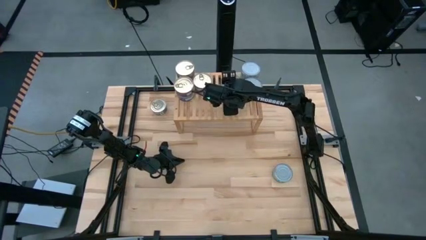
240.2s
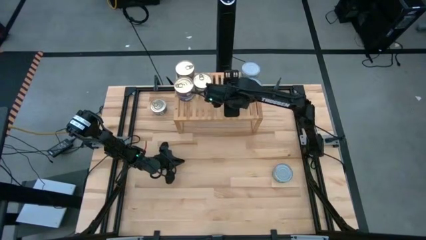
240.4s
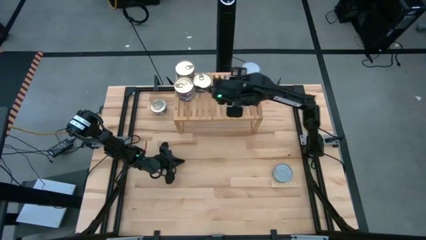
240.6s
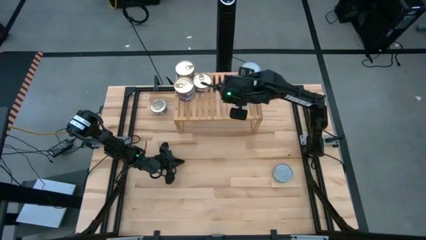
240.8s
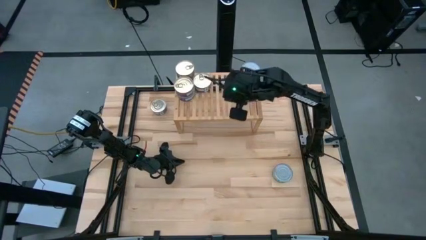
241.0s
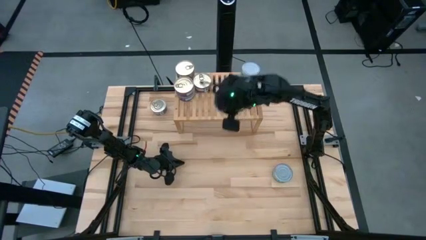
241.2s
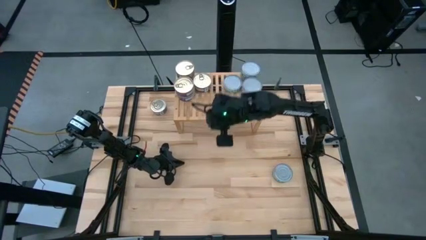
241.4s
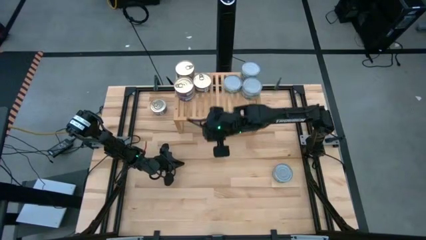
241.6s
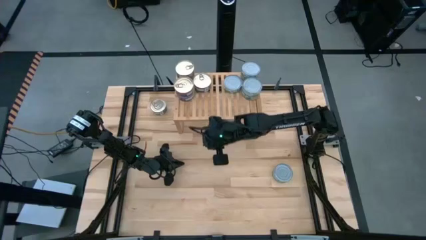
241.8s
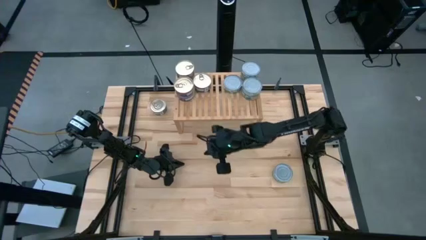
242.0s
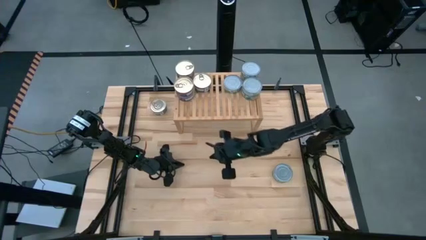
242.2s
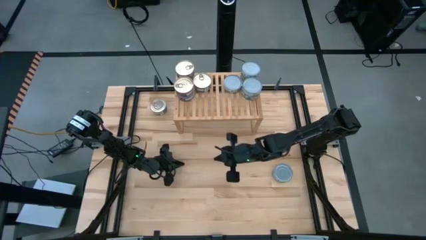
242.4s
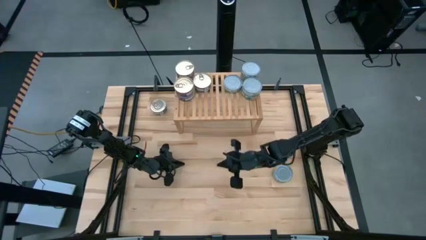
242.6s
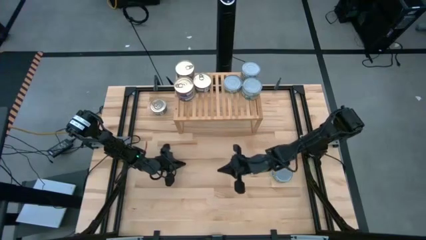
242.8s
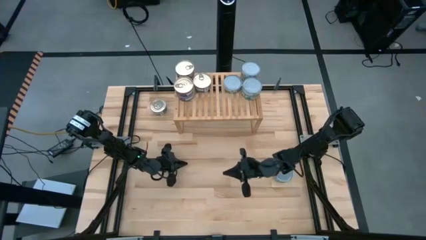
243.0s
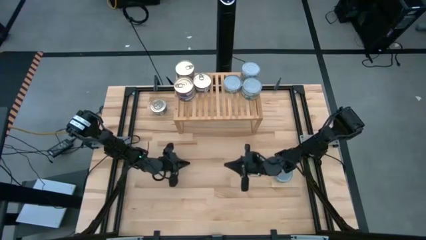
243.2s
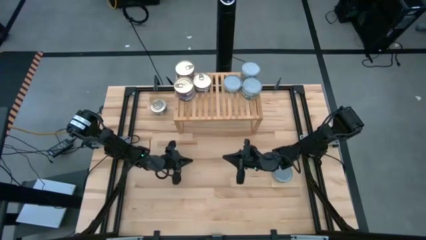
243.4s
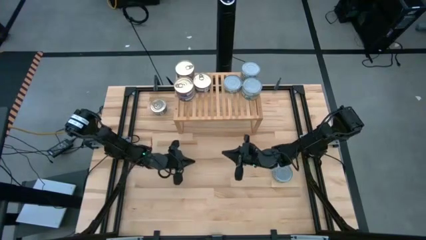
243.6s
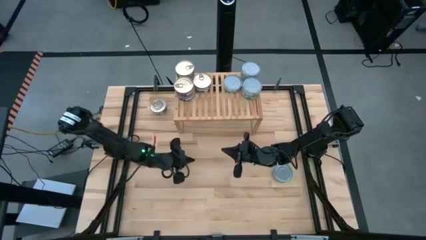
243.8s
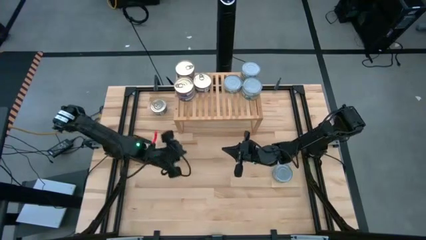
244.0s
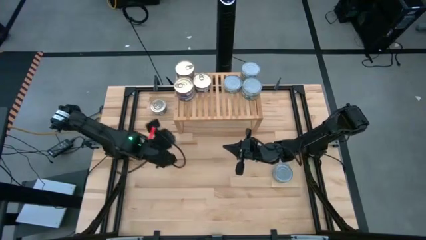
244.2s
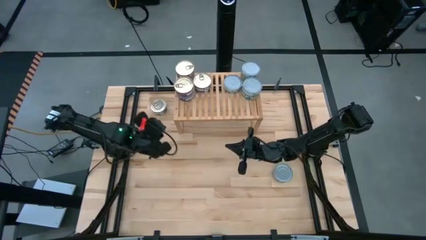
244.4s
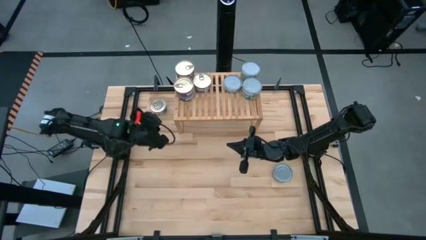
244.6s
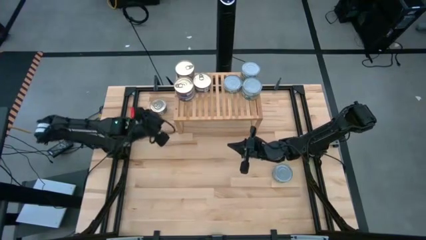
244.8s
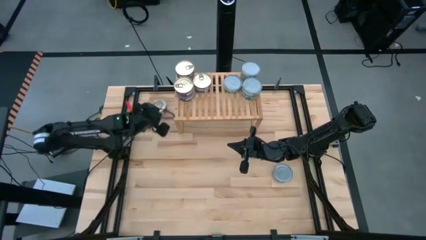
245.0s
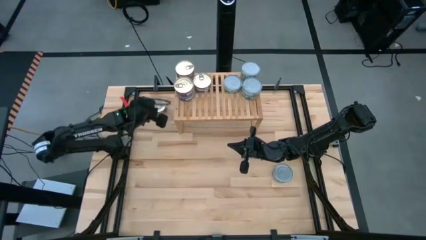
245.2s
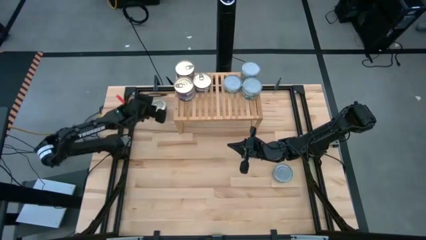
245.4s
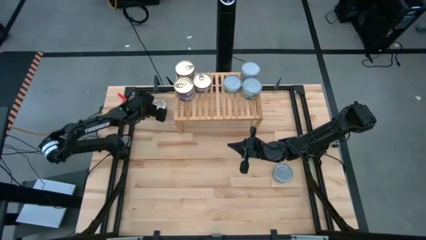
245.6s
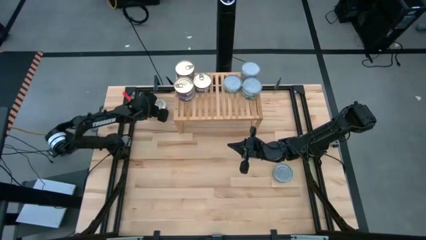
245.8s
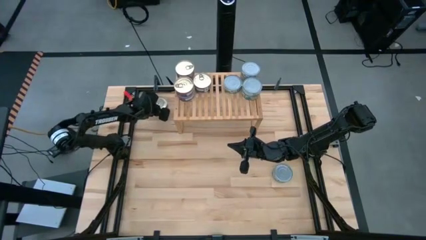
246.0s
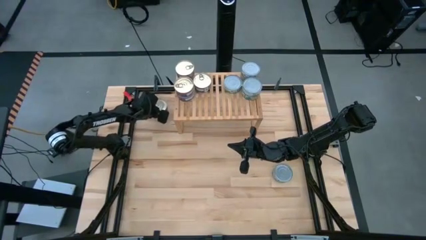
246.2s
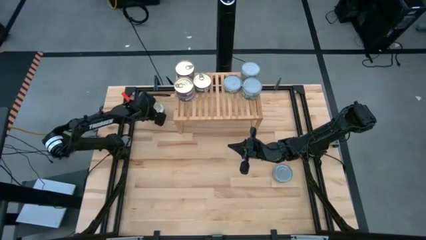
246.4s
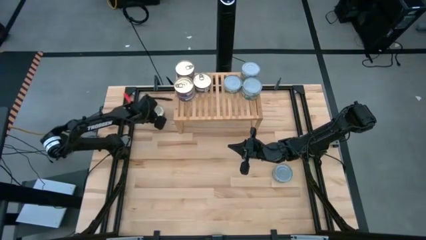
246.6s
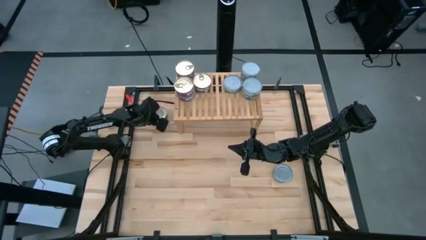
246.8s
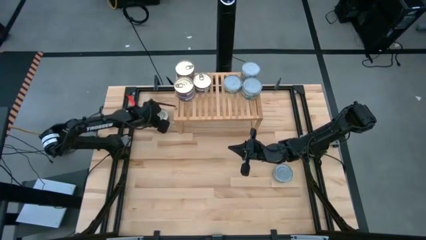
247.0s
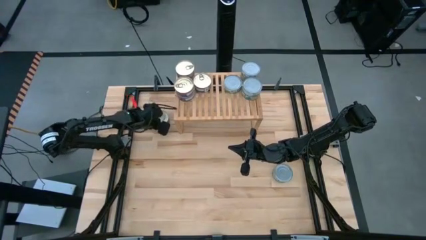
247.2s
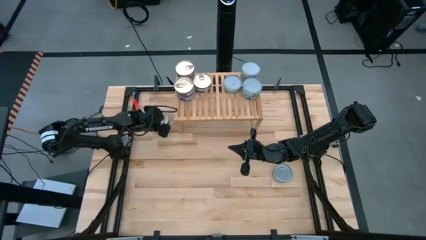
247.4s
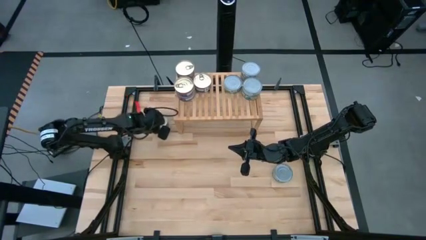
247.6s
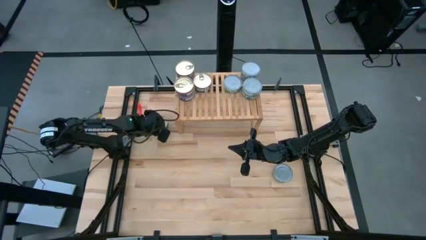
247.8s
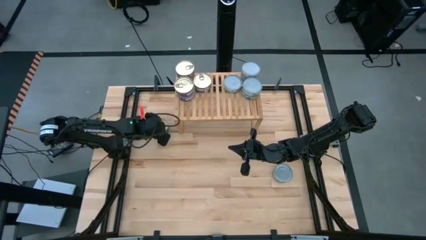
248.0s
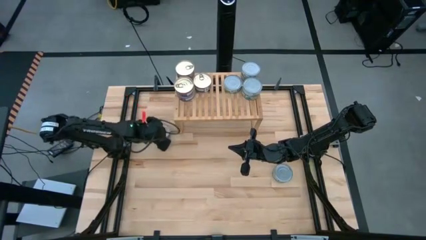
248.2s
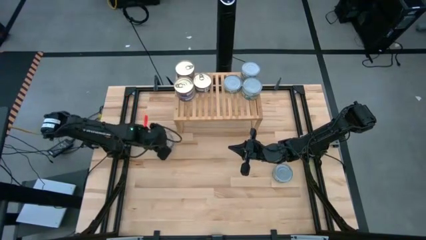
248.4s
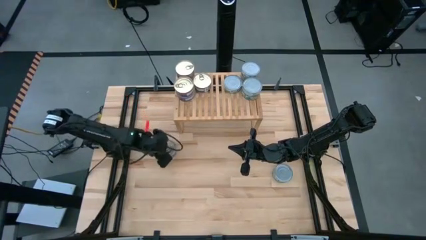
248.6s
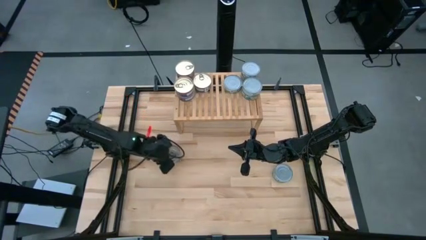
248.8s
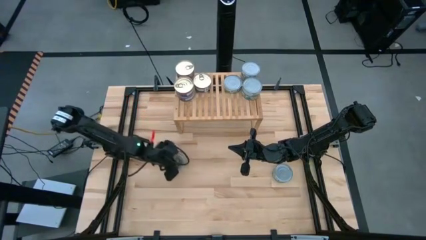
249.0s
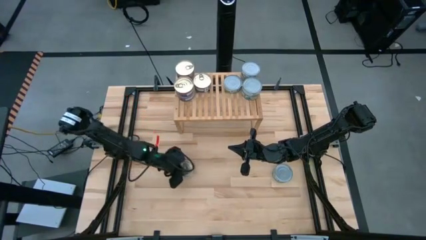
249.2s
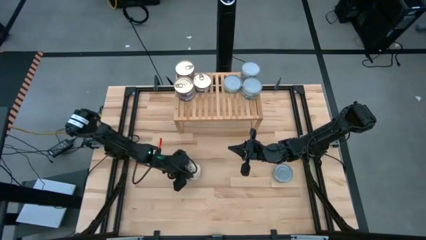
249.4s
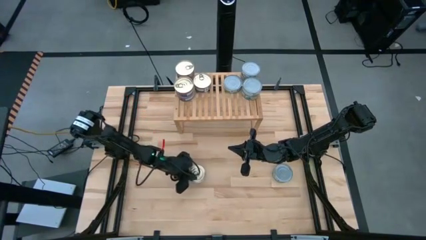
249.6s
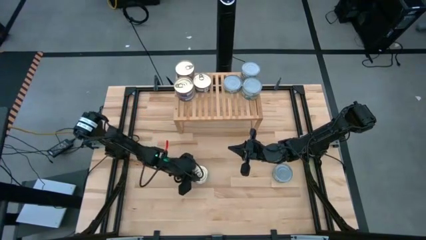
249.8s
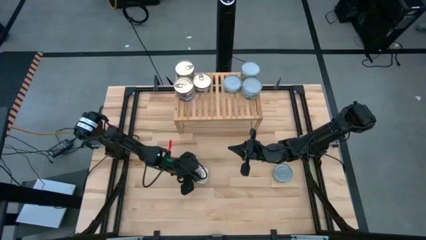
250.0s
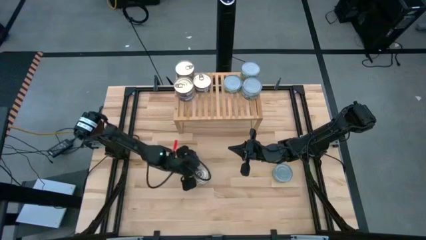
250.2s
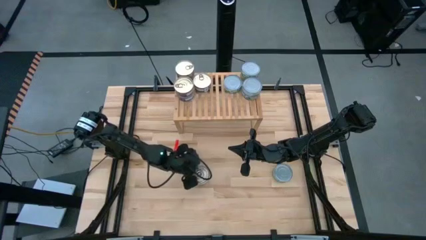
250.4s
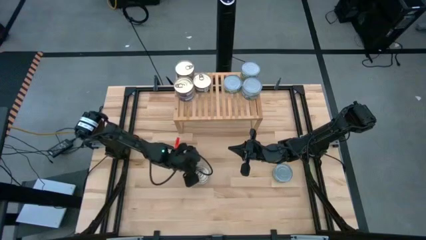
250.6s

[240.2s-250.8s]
Task: Stack canned seafood by type on shelf
Stack the blue-pink tuna can on top of the other blue tuna can on the shelf

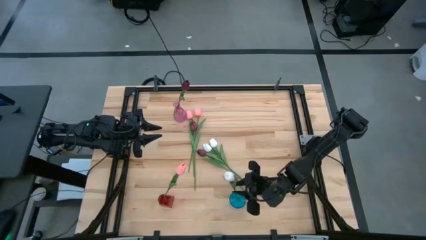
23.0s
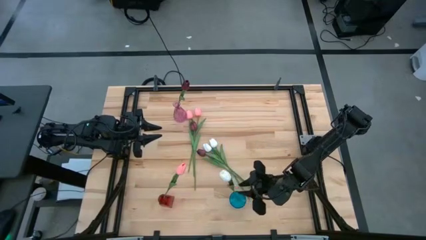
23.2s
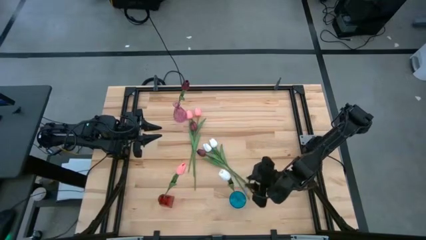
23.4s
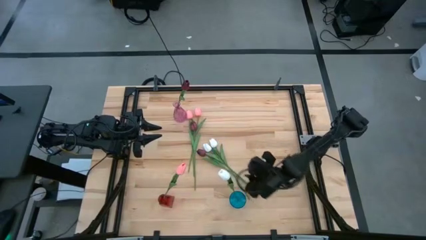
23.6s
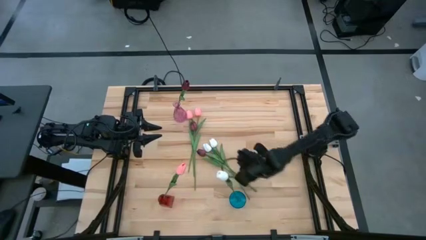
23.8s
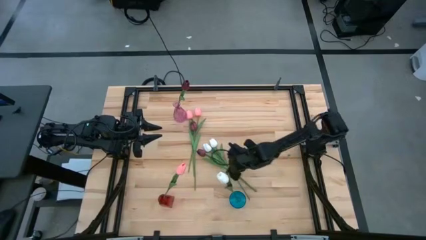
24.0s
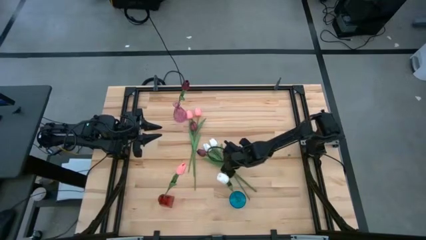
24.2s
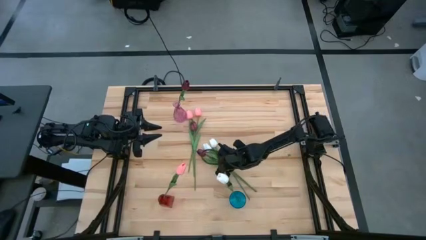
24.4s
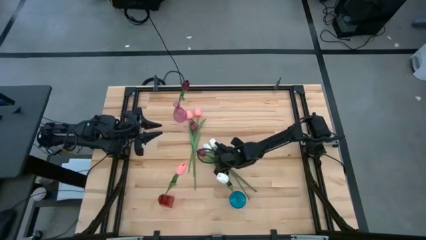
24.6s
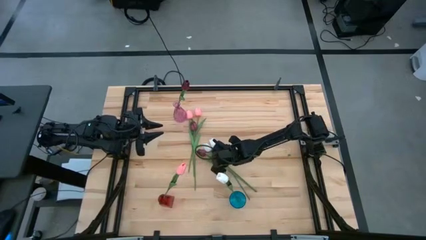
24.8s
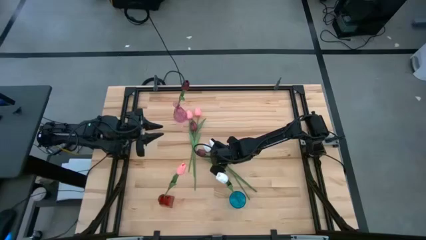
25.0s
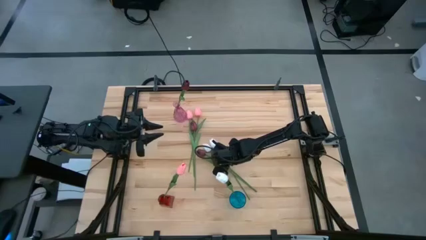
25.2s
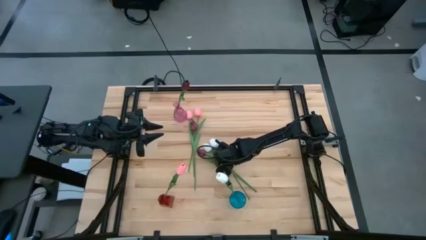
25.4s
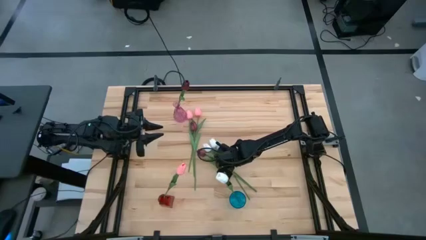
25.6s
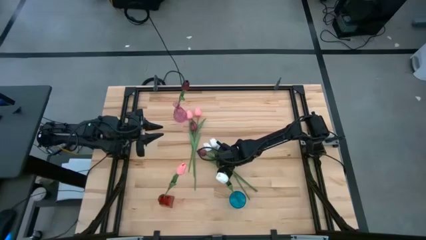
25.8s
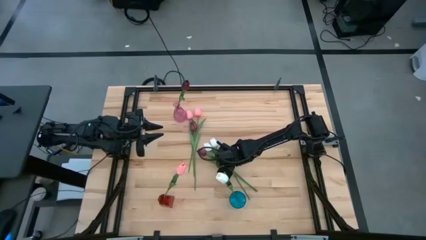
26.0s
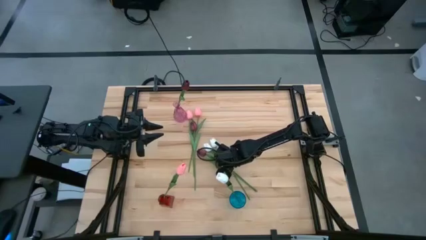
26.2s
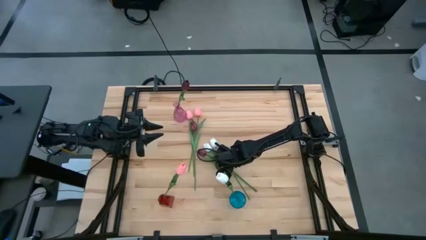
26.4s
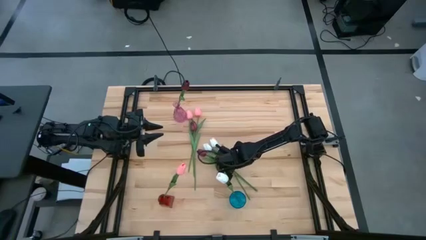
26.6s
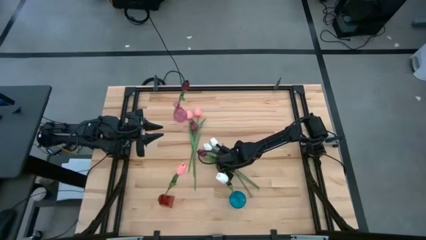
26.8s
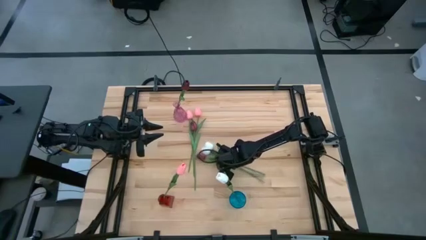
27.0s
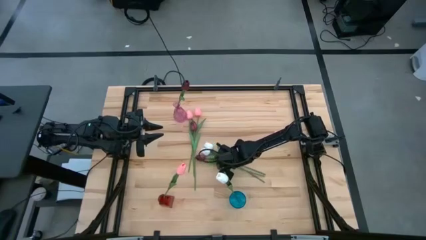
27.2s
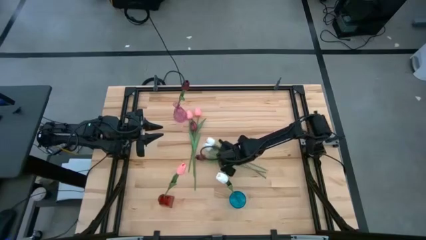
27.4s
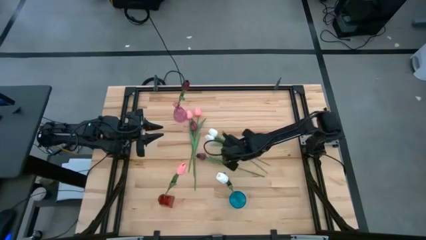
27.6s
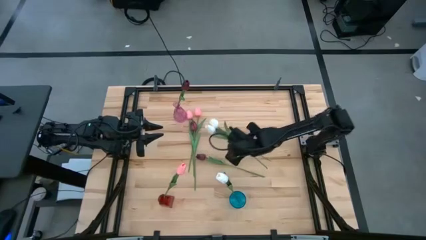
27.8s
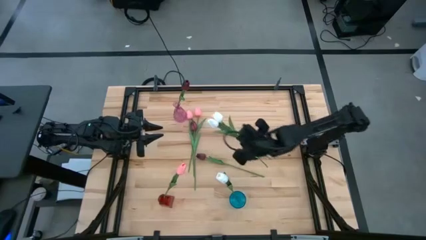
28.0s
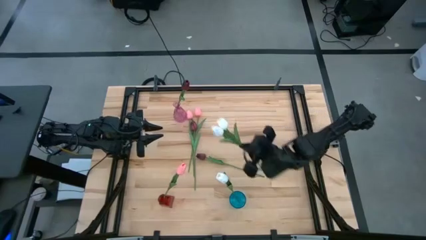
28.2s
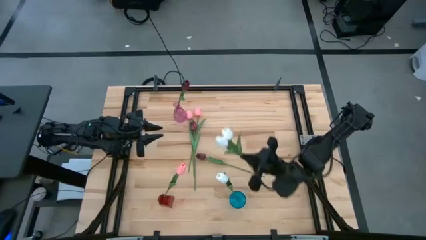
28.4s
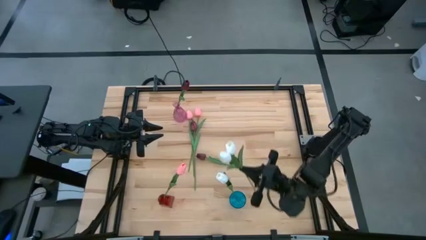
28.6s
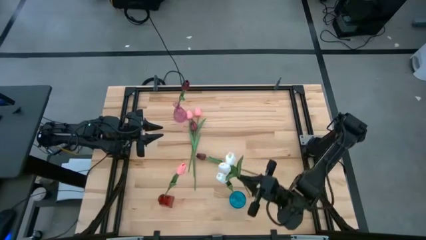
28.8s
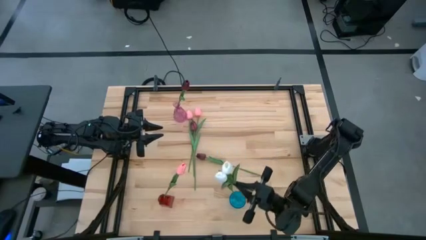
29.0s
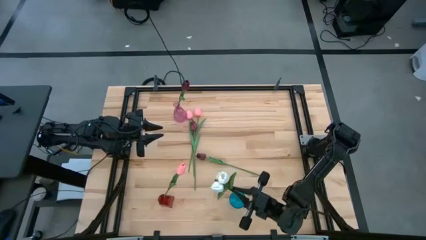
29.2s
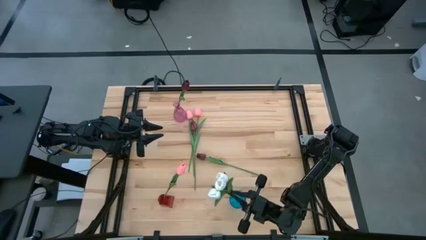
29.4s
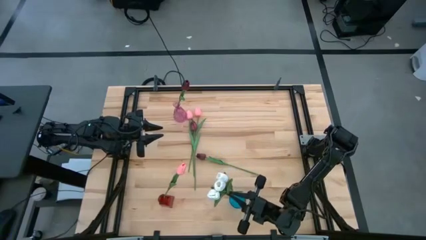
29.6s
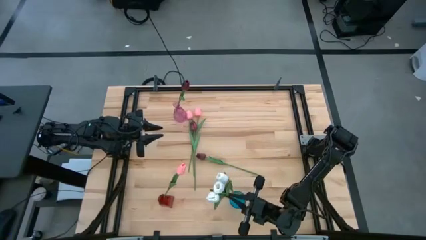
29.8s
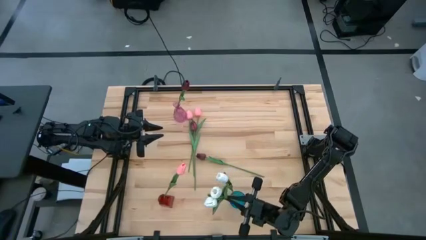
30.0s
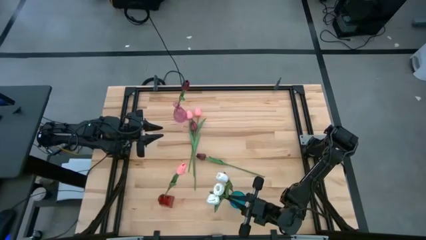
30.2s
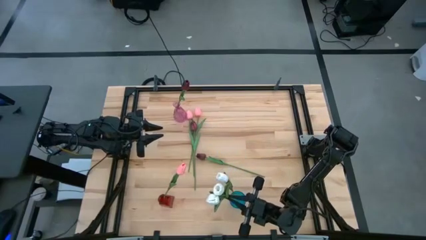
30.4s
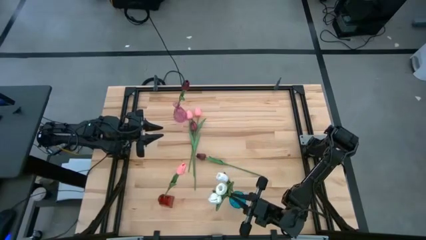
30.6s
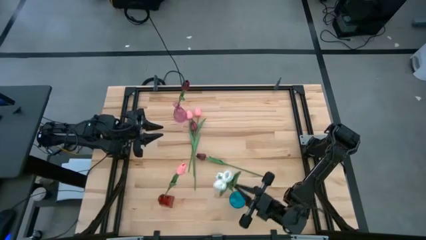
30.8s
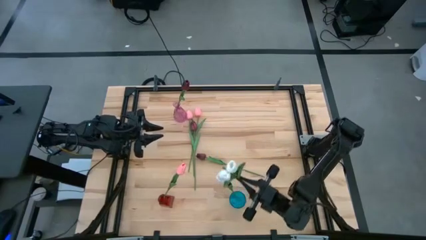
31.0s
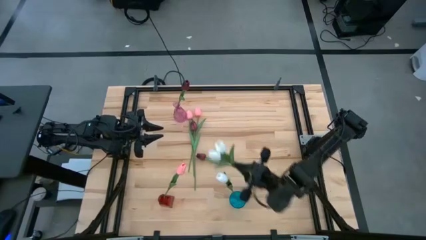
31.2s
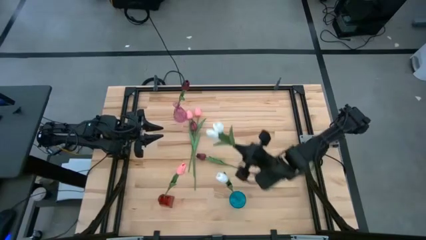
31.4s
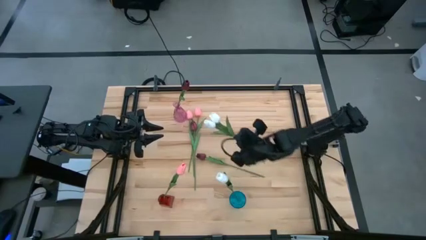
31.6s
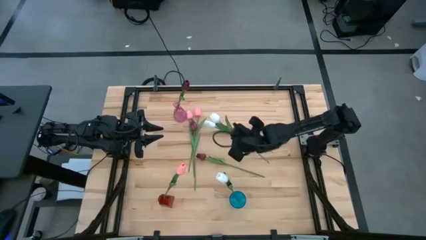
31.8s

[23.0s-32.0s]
Task: Sort flowers into vase by color
Put the right white flower into the blue vase
